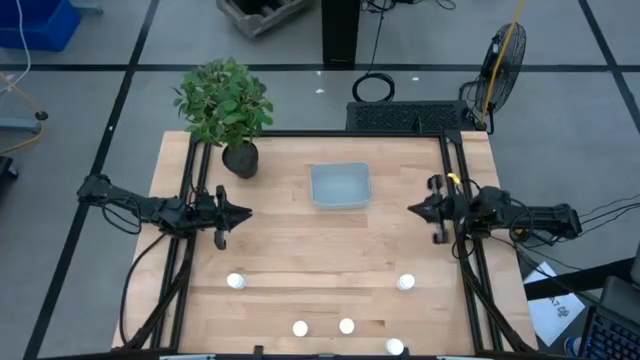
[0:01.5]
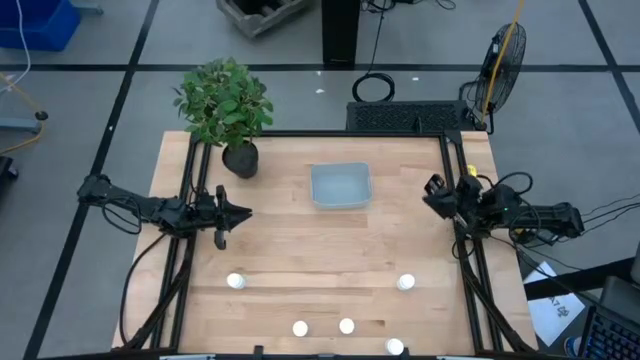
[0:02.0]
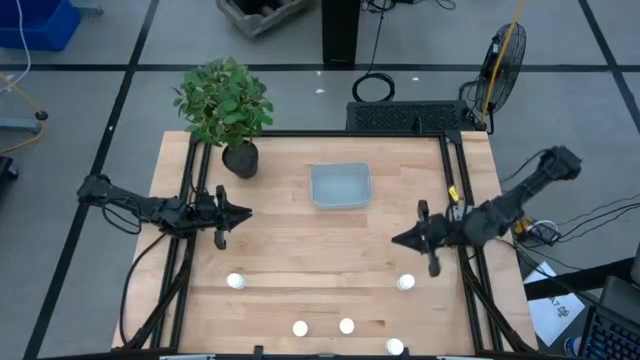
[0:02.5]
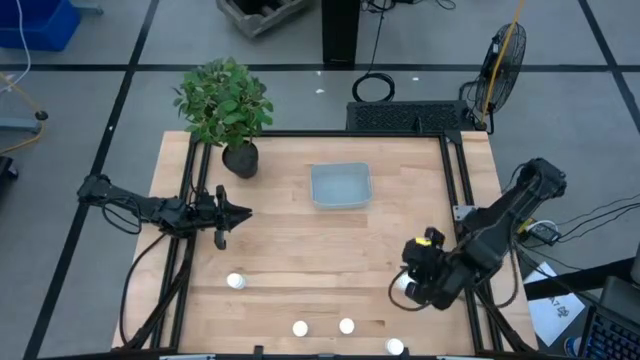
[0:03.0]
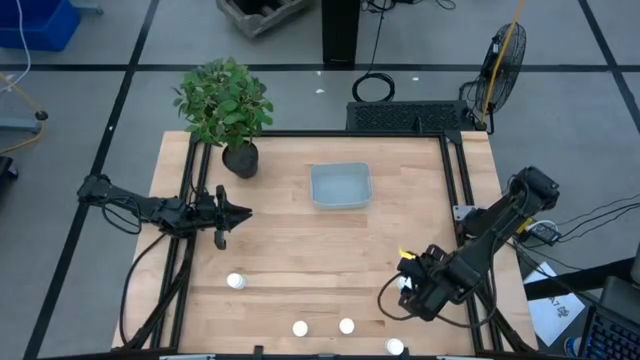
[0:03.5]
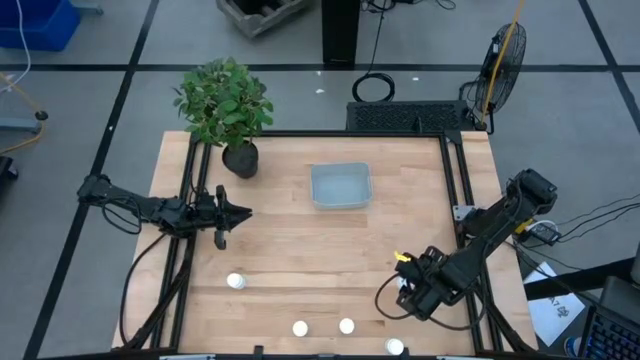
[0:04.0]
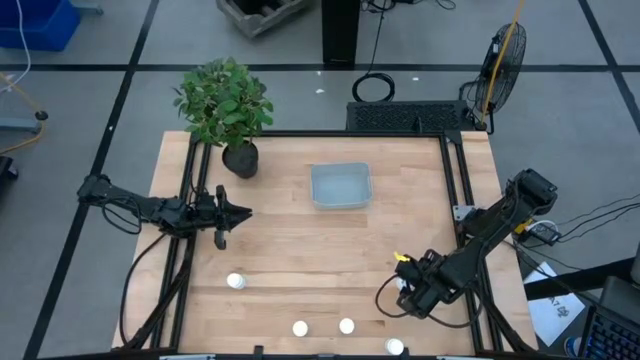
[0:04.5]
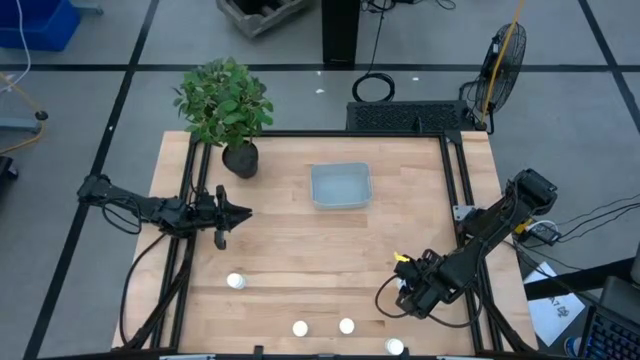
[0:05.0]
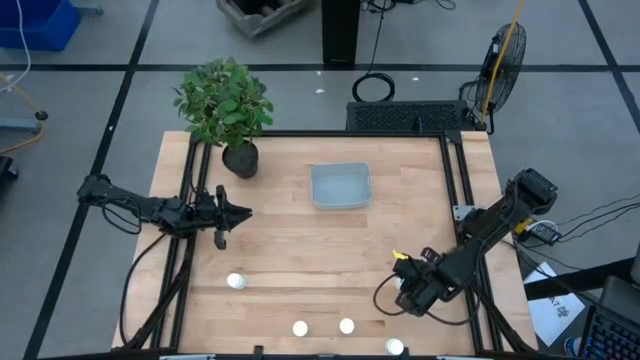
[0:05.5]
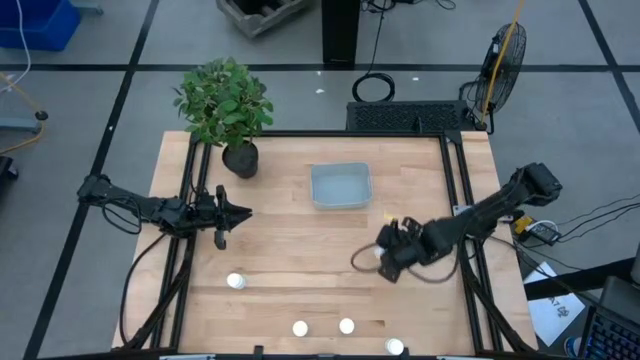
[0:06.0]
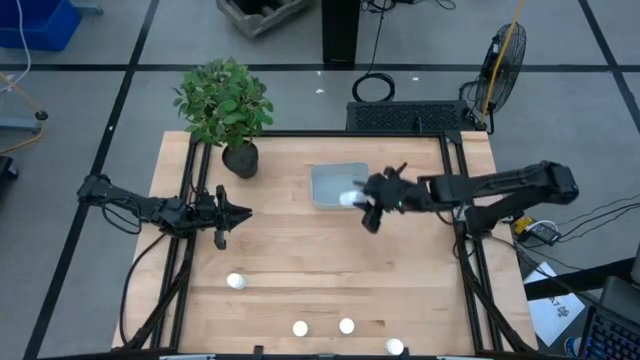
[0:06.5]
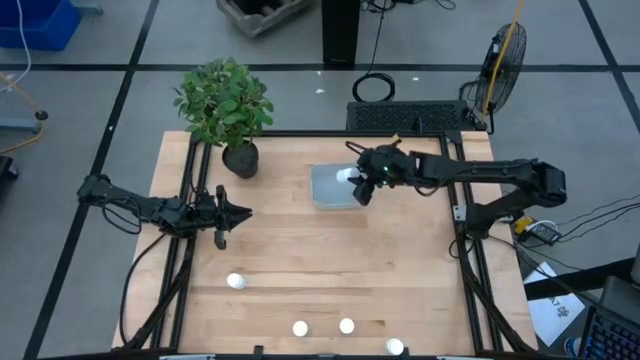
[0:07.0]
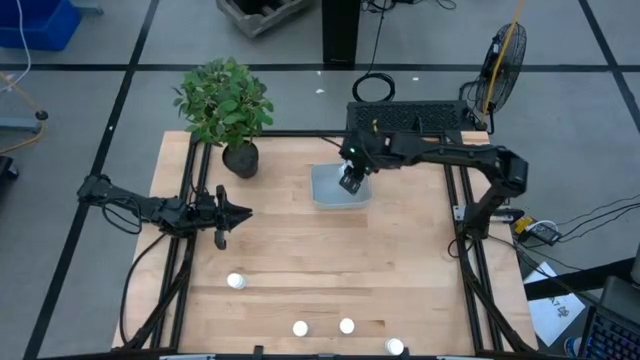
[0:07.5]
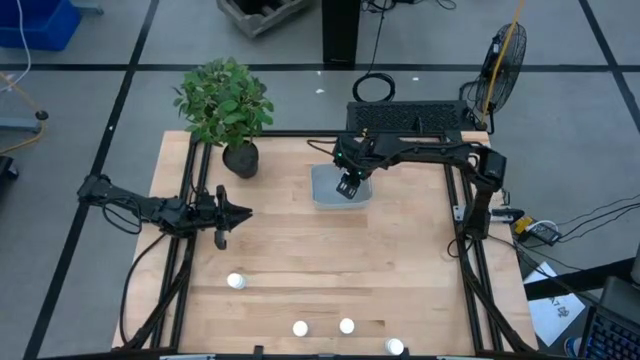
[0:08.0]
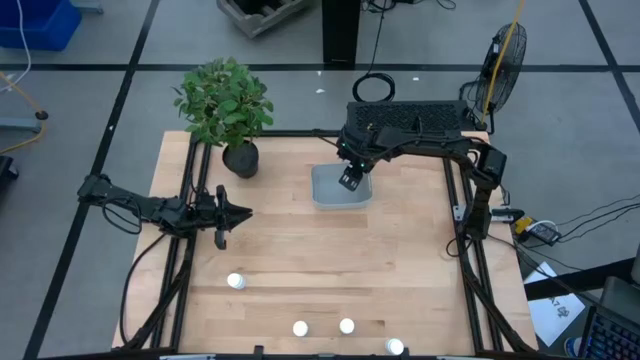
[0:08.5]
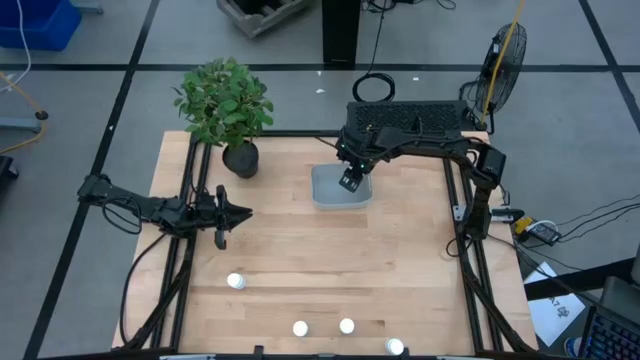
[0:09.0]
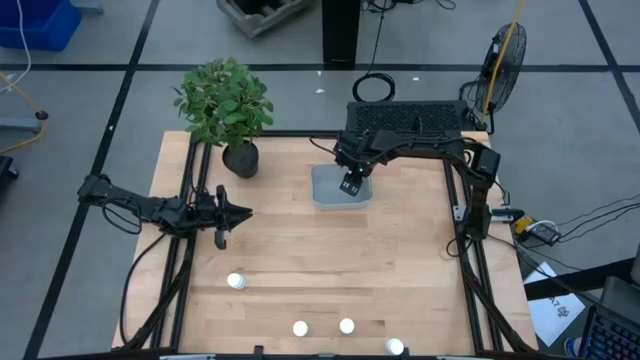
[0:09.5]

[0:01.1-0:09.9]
Task: Pick and place pill bottles into a basket
Put the white pill bottle into the white bin

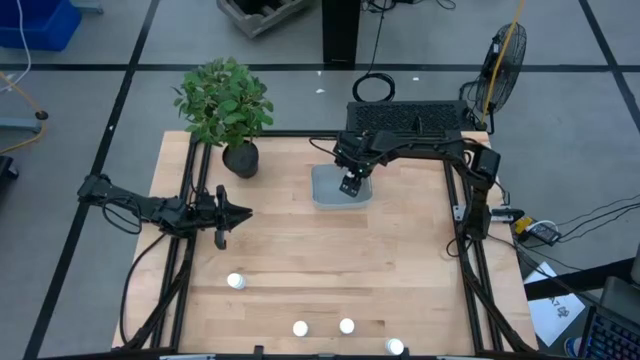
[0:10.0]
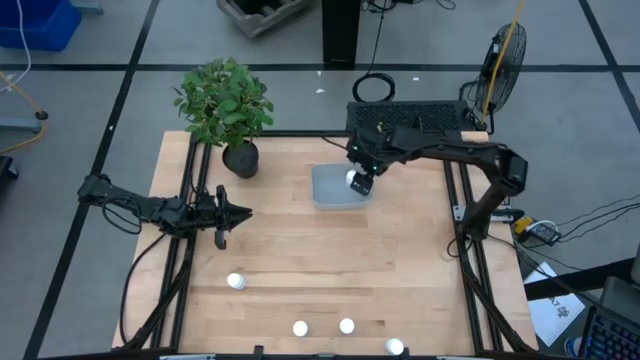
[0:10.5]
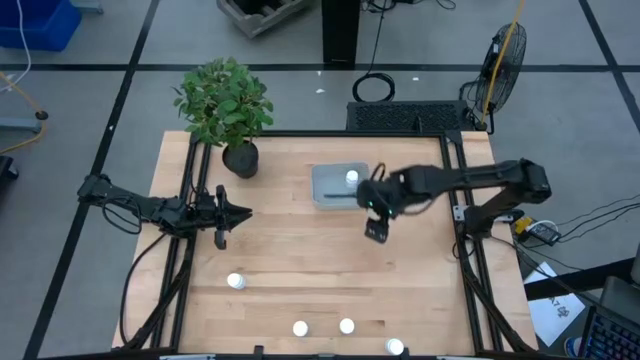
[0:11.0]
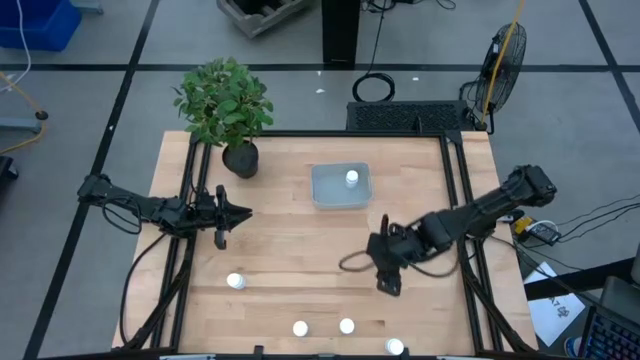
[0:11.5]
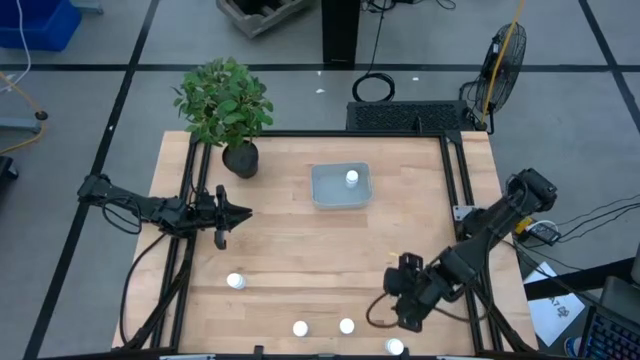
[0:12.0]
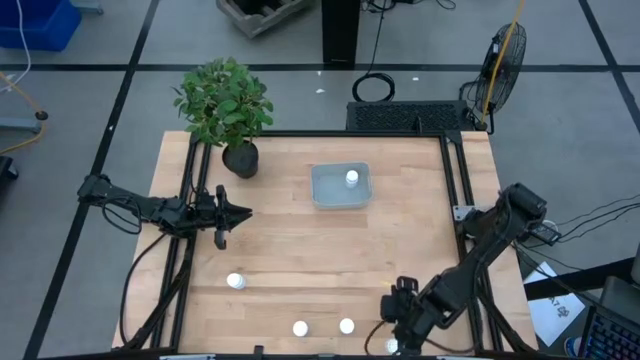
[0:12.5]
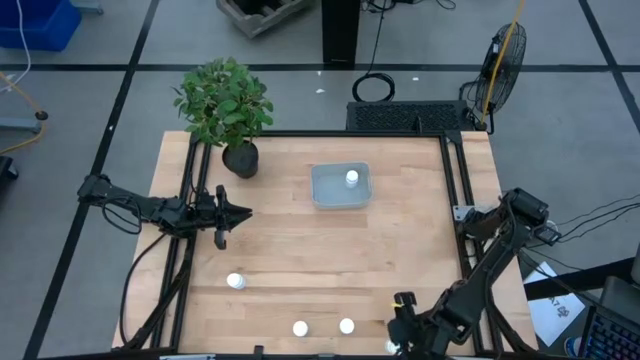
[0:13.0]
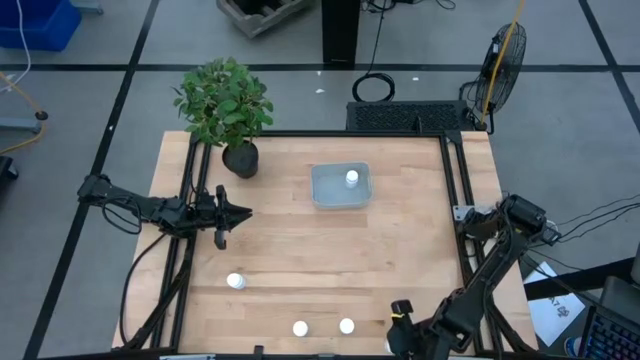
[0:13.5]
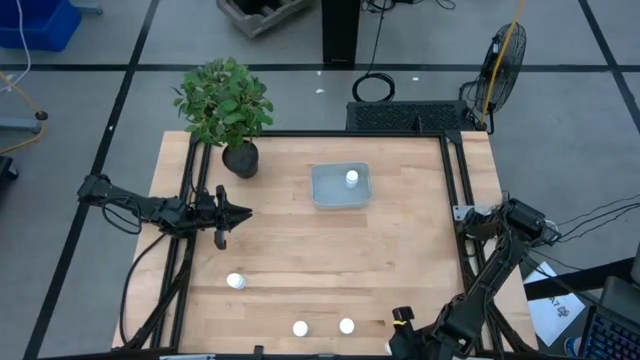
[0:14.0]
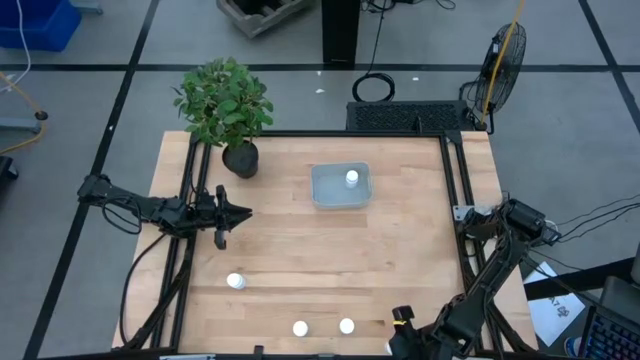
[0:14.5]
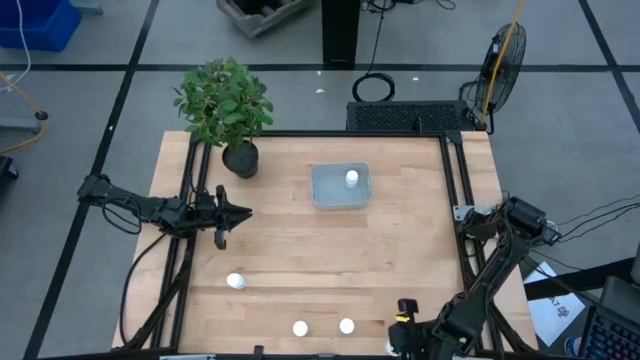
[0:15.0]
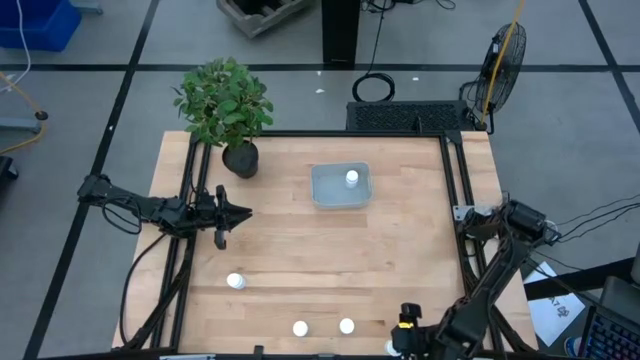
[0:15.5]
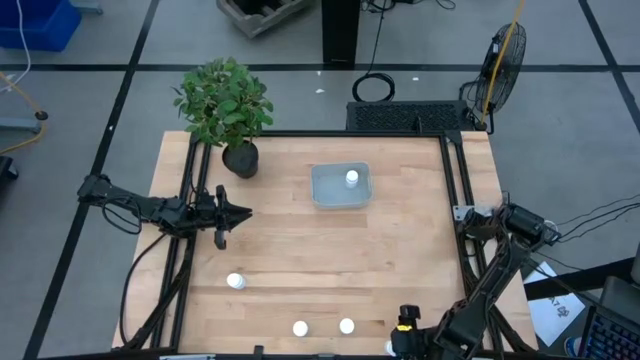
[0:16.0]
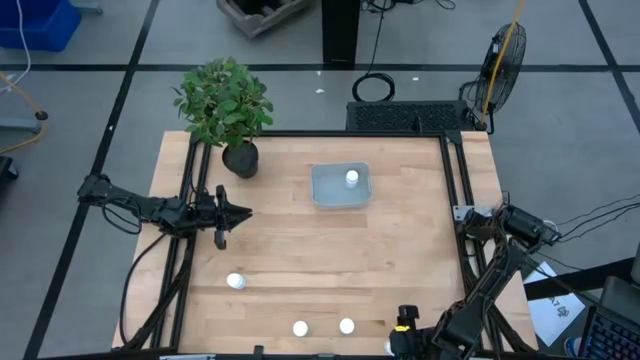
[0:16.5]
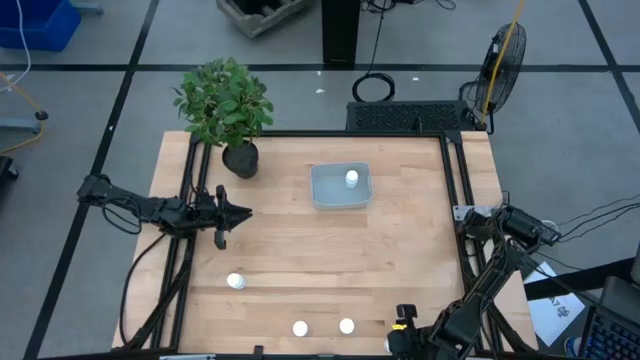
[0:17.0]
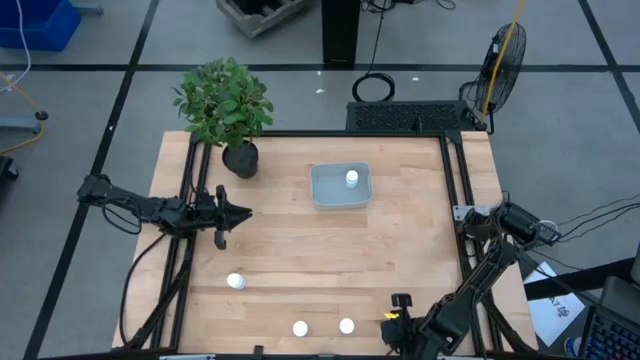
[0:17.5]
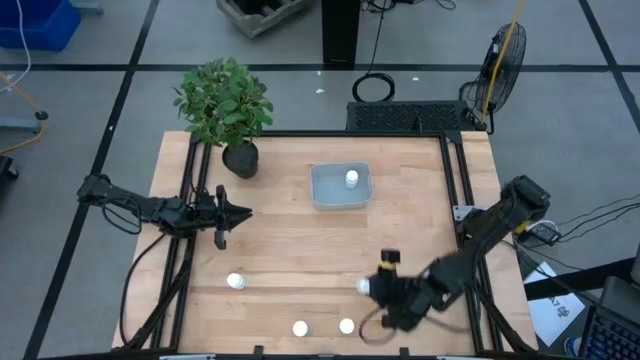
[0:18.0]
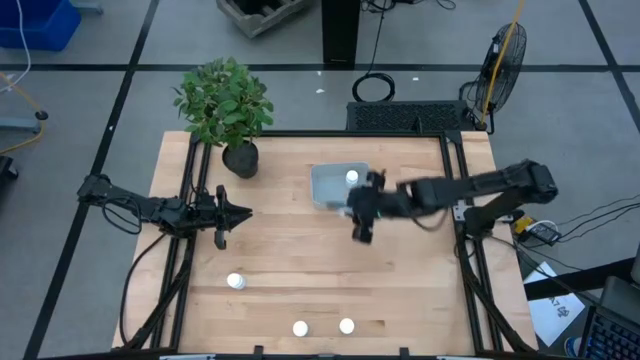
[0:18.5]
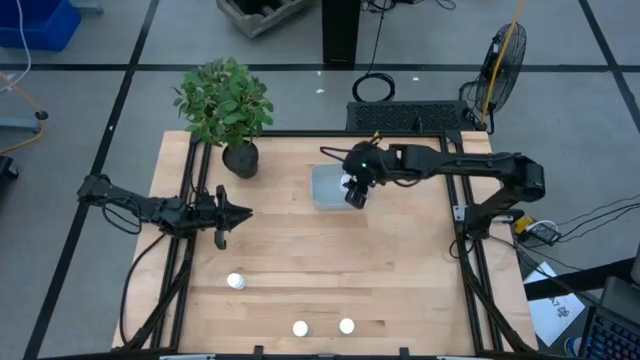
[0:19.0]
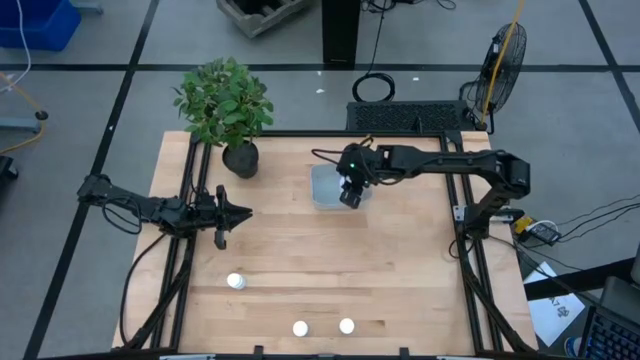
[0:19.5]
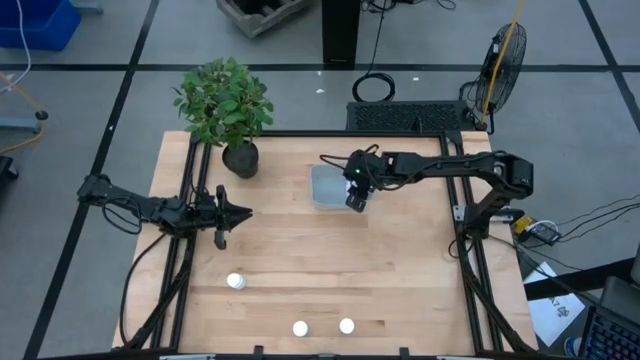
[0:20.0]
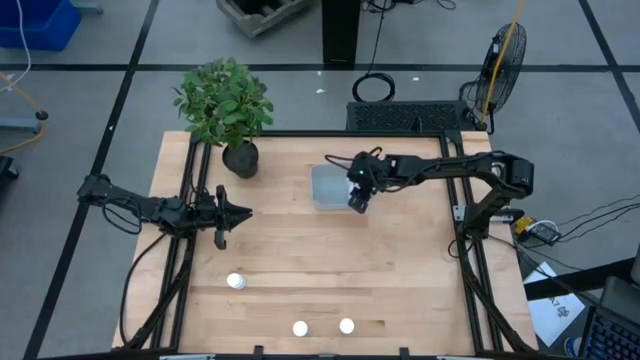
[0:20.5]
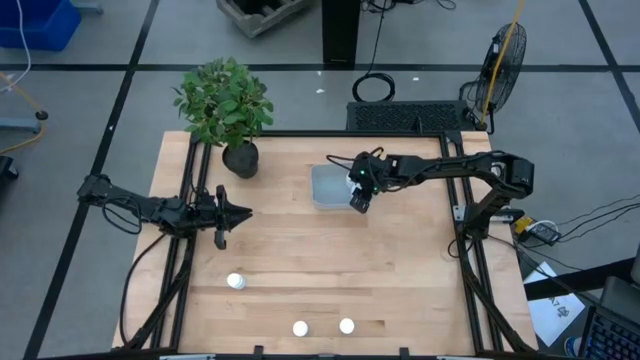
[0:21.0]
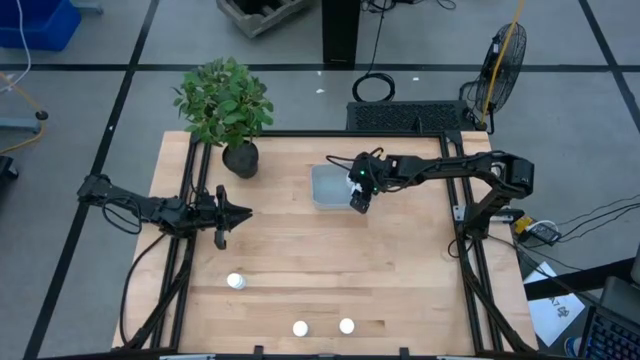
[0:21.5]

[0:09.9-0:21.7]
Put the white pill bottle into the white bin
